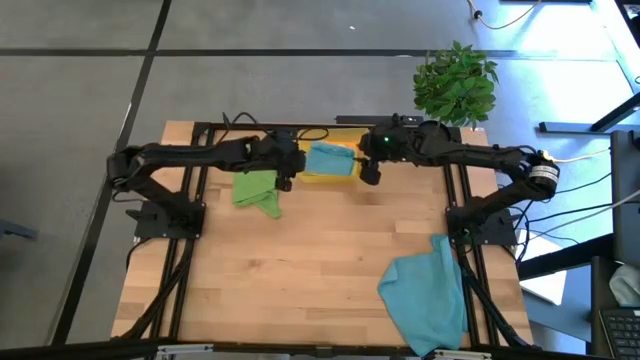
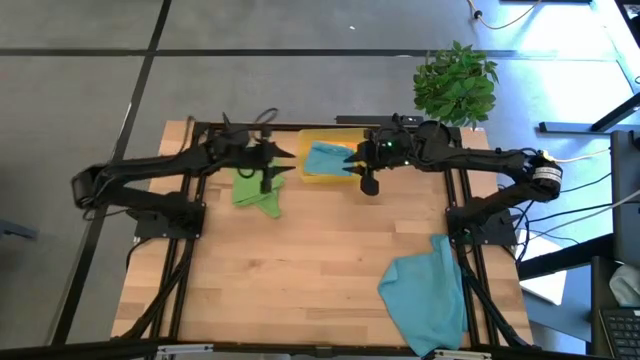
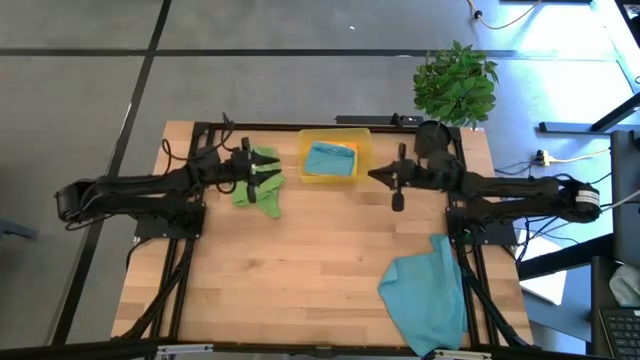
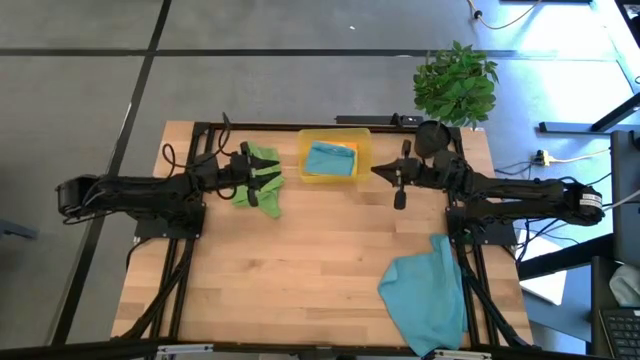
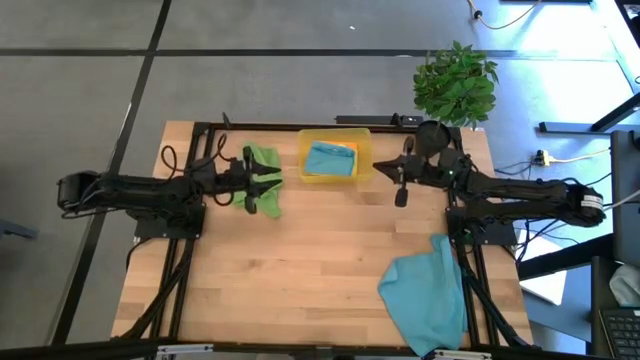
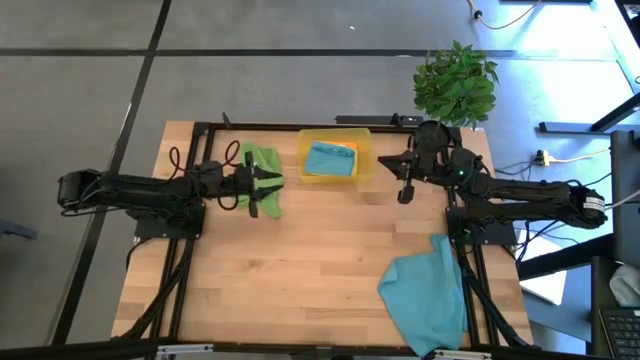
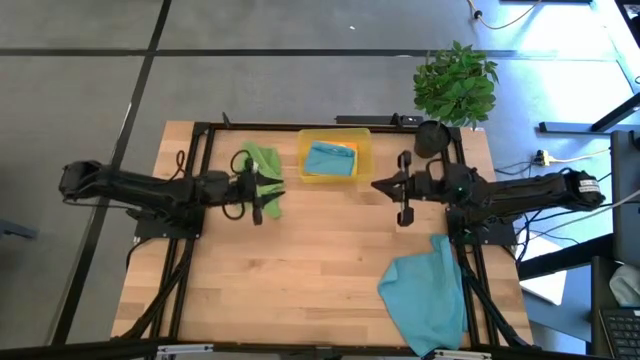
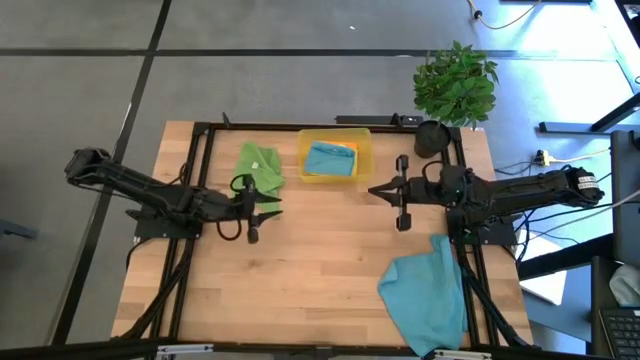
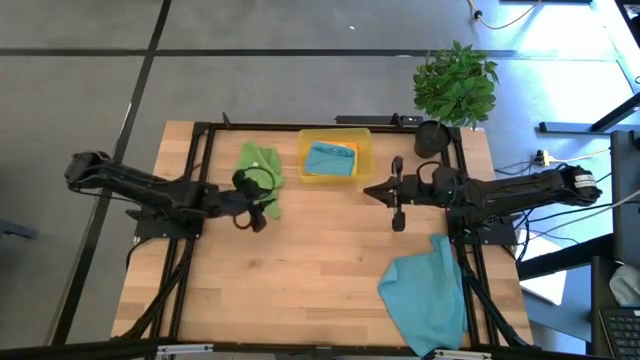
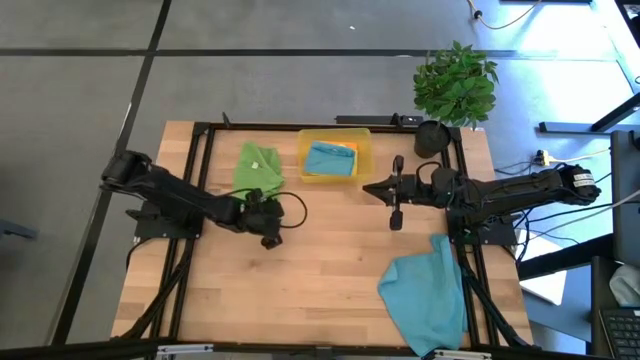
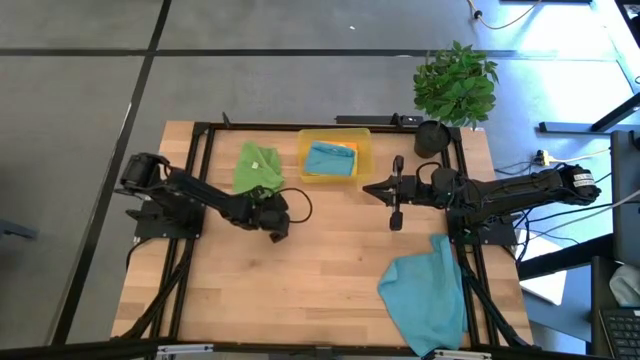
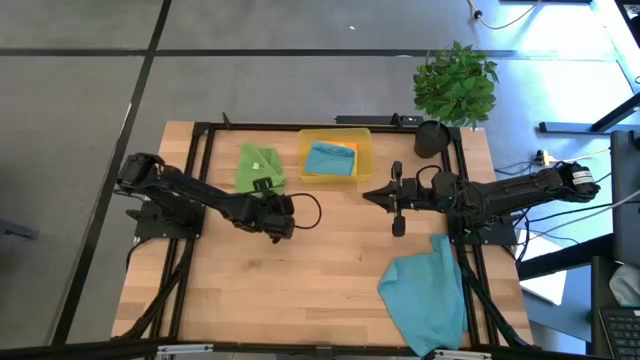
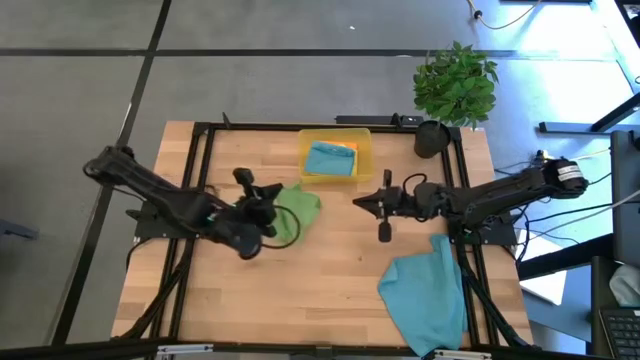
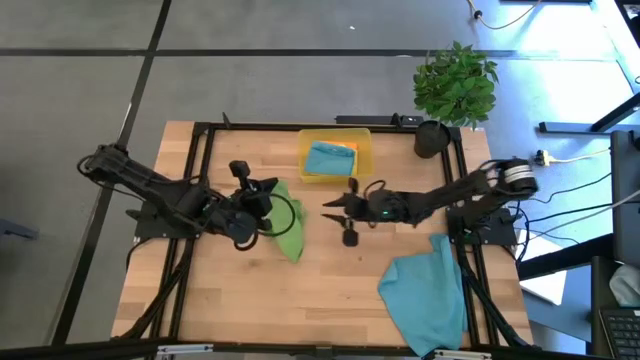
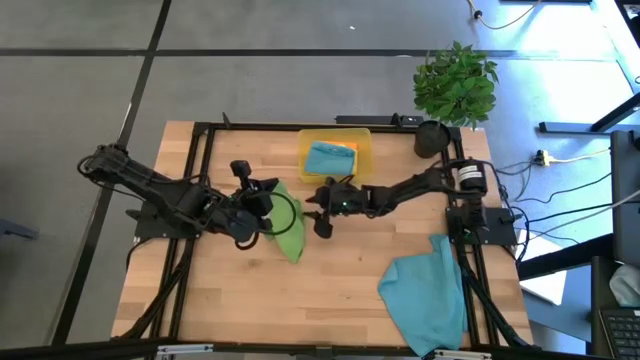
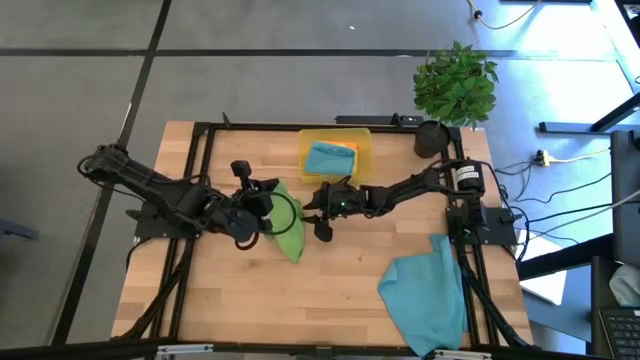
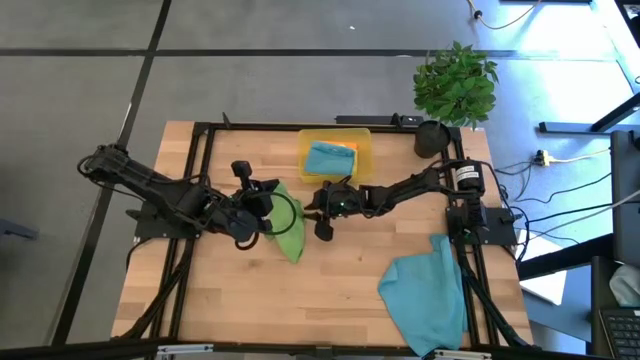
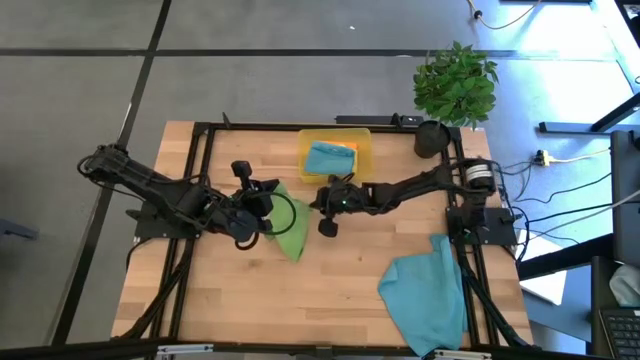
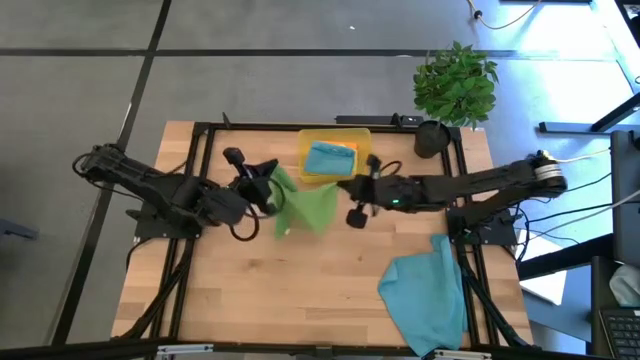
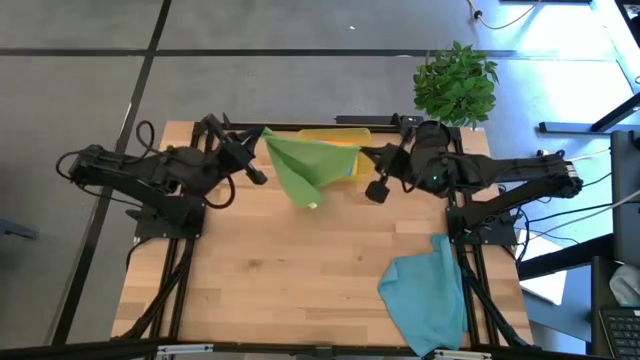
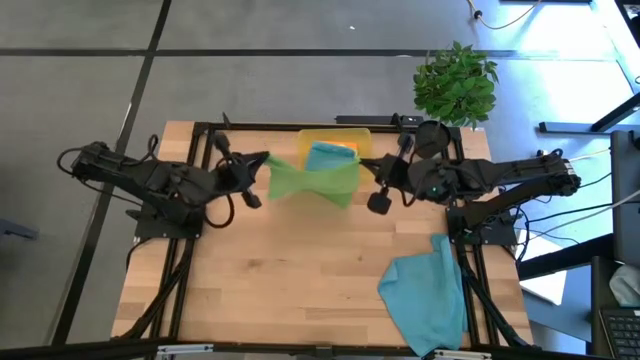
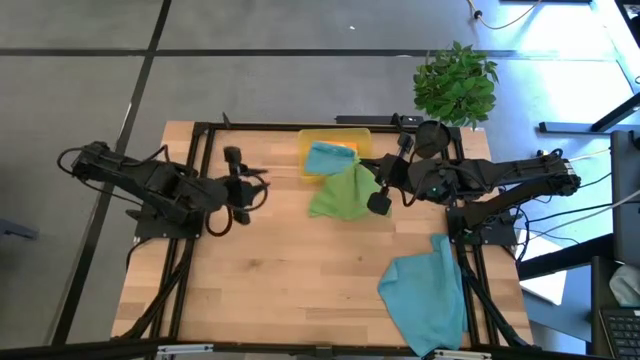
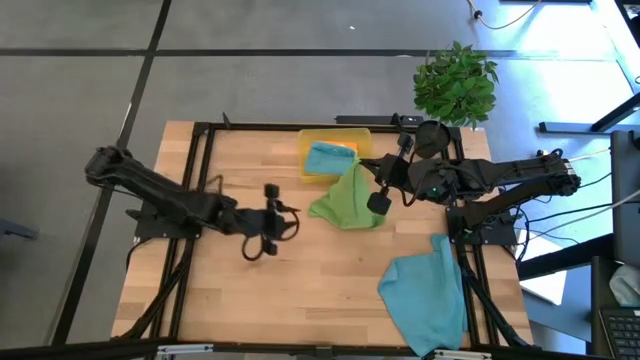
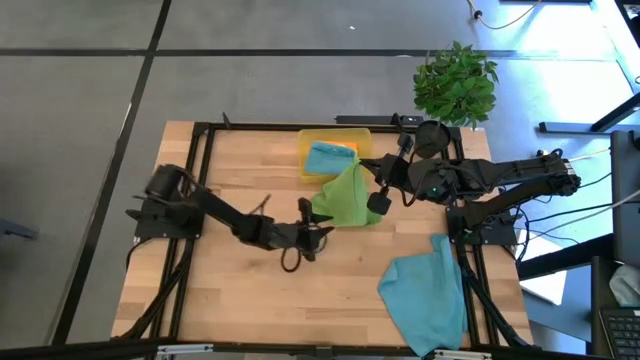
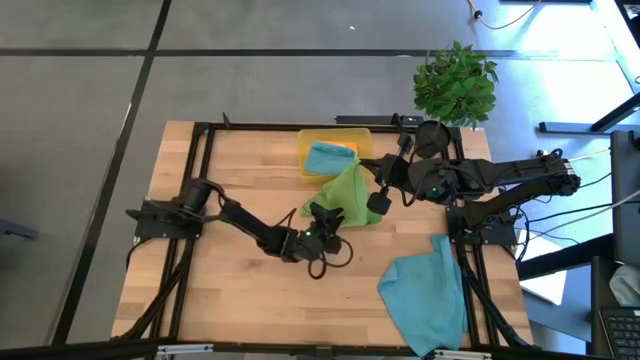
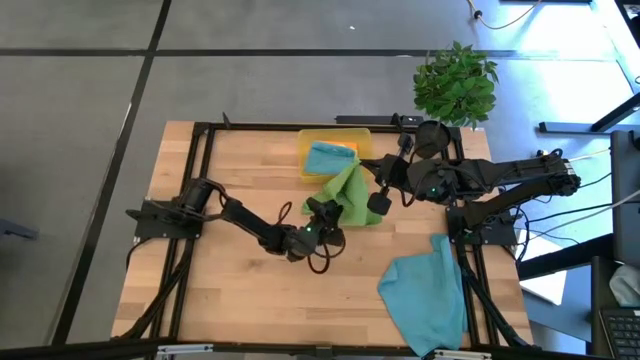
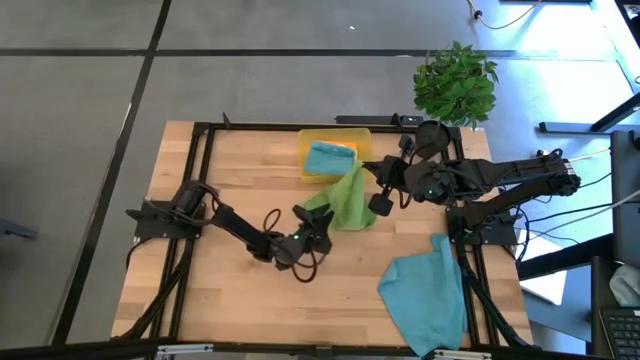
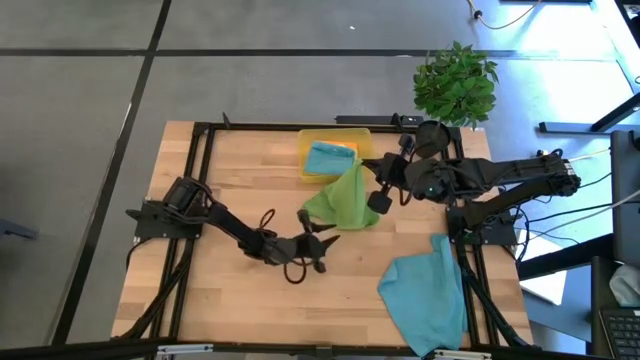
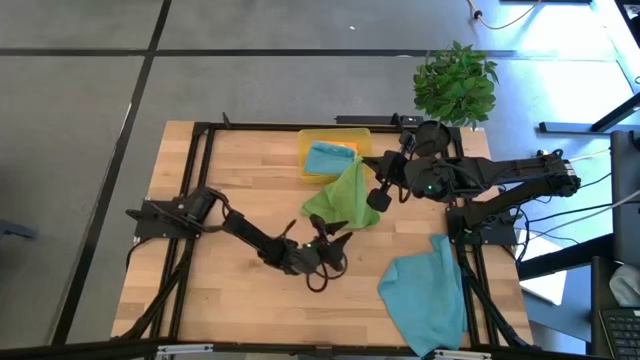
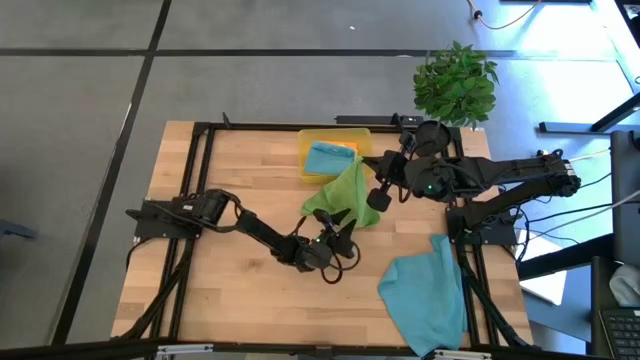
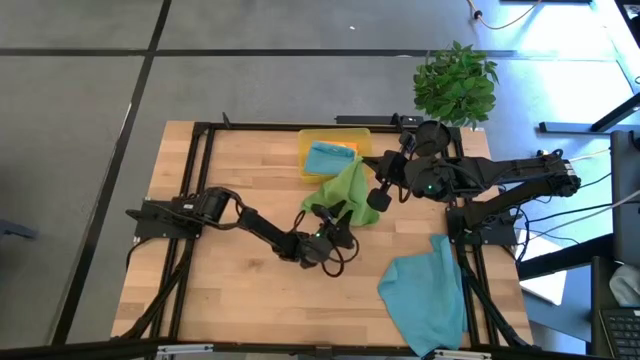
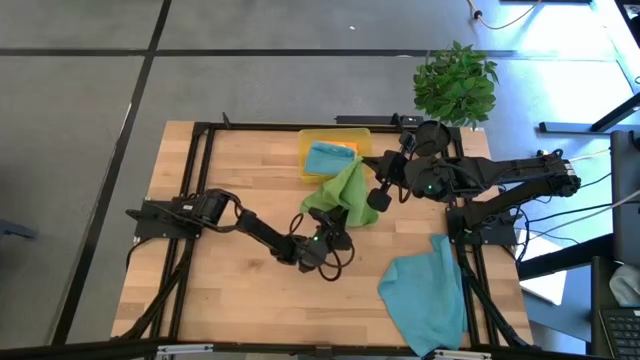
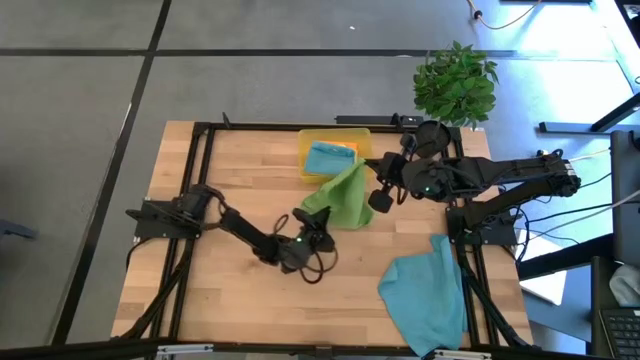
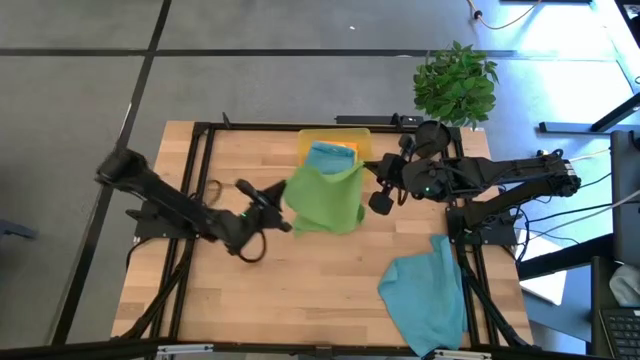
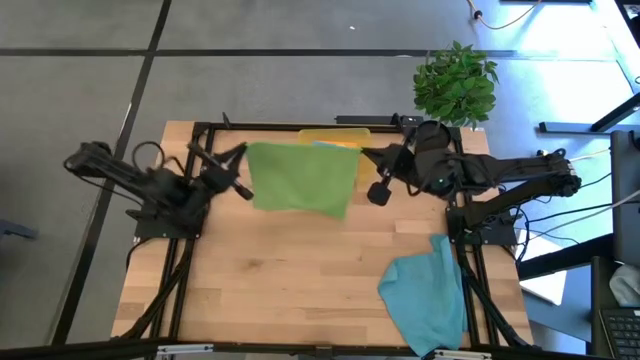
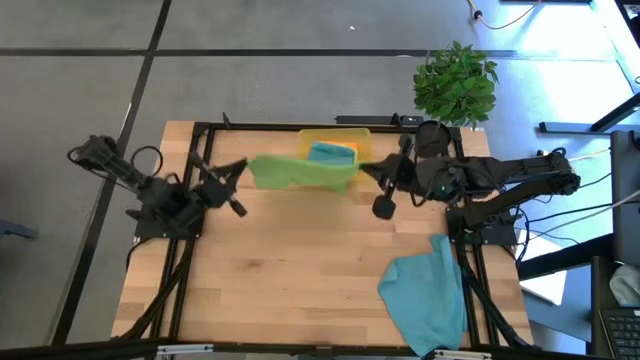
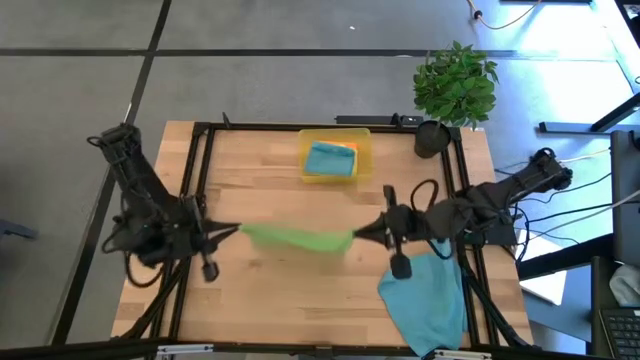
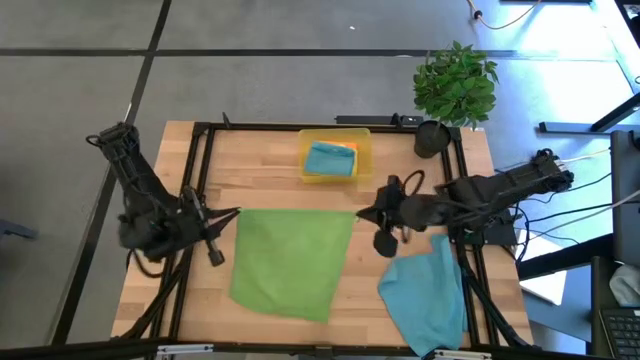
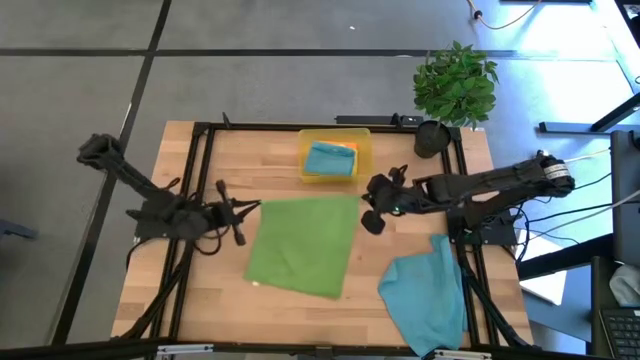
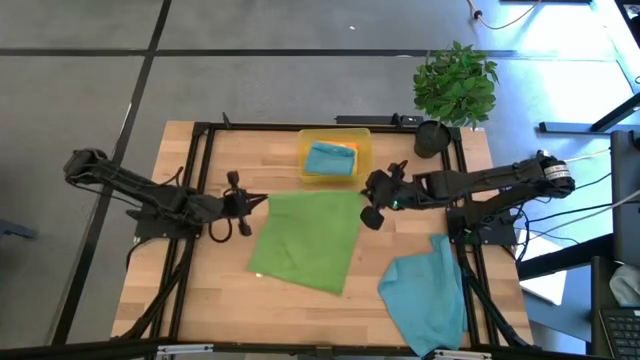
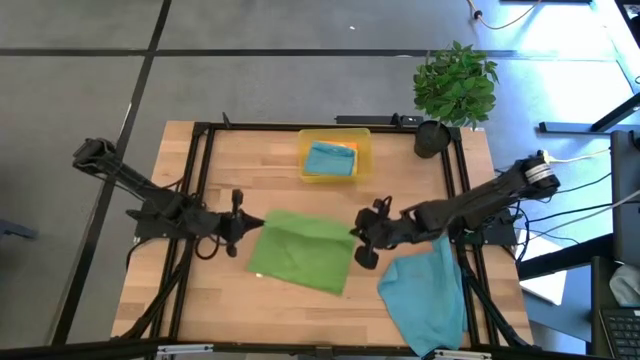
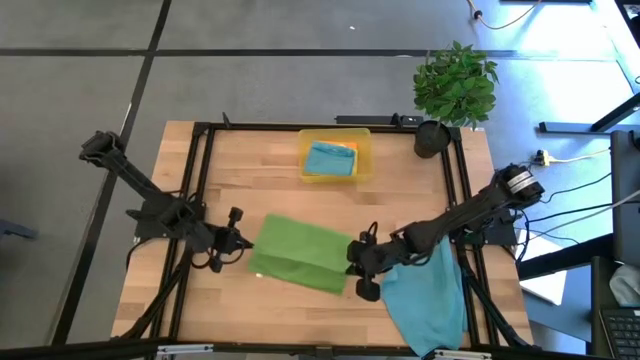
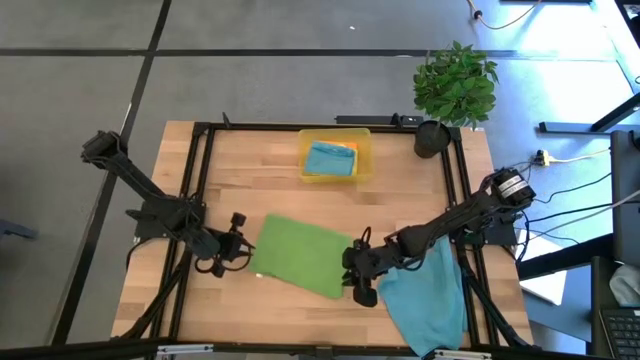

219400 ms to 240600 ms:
Task: Fold microfiber towels
Fold the green microfiber cloth

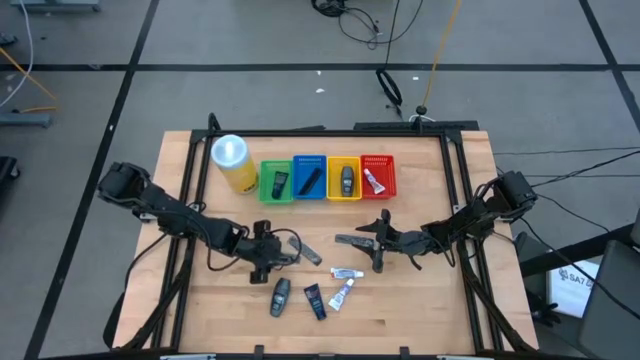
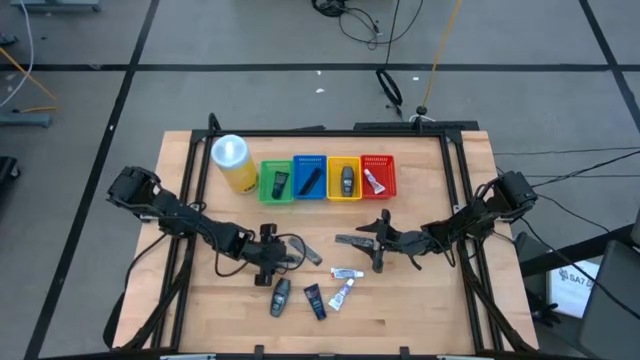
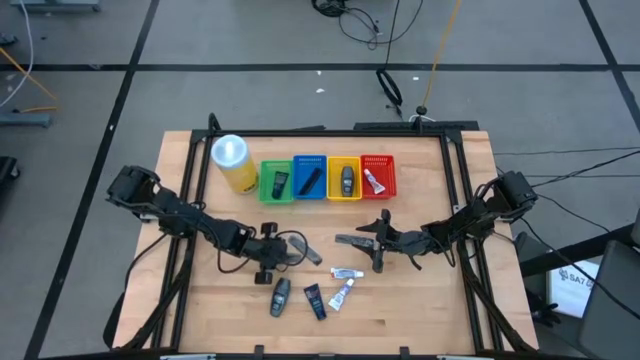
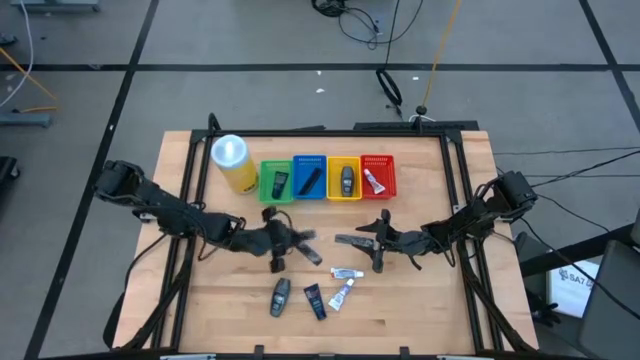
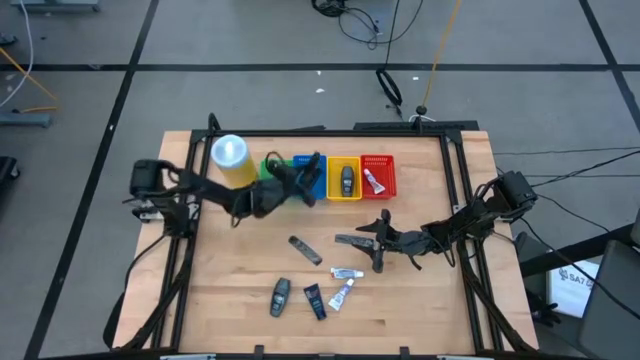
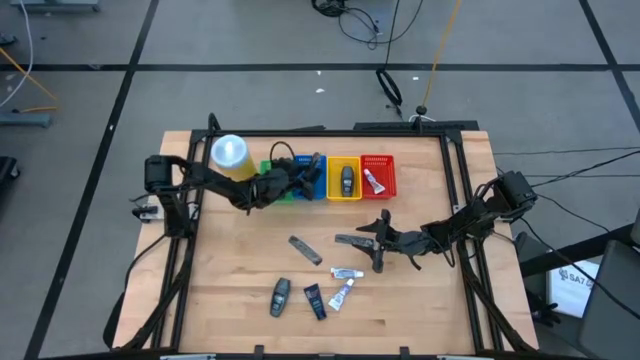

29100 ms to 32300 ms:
Task: Pick & Place Travel size toiletries
Put the hair comb into the blue basket
